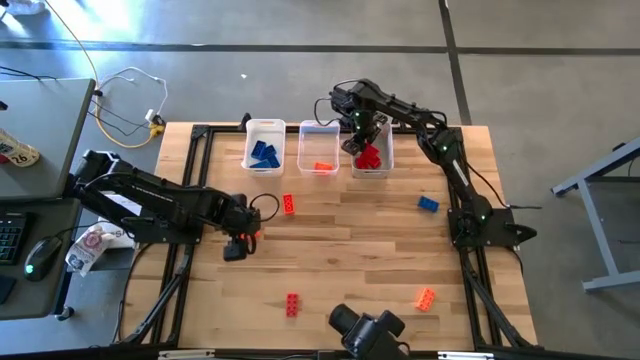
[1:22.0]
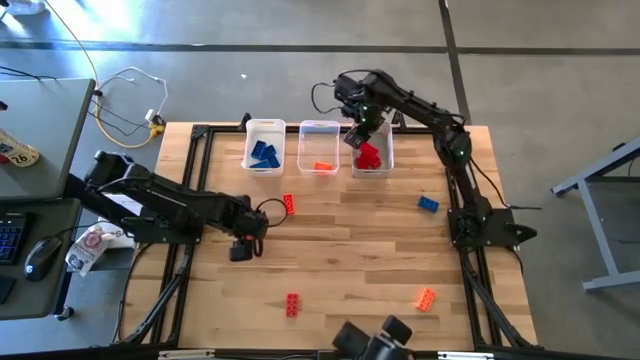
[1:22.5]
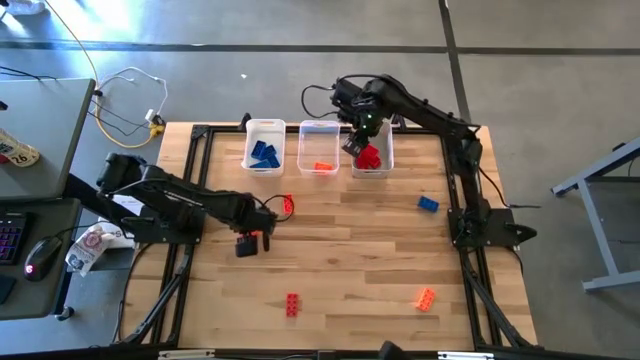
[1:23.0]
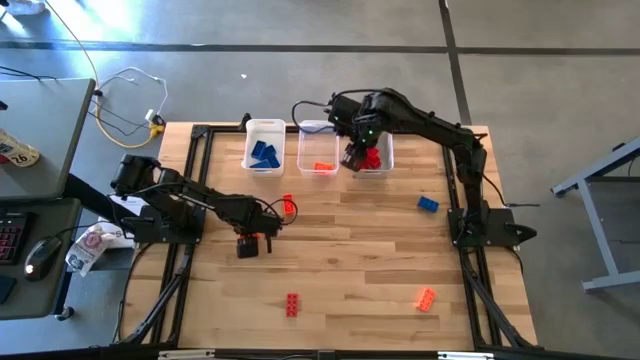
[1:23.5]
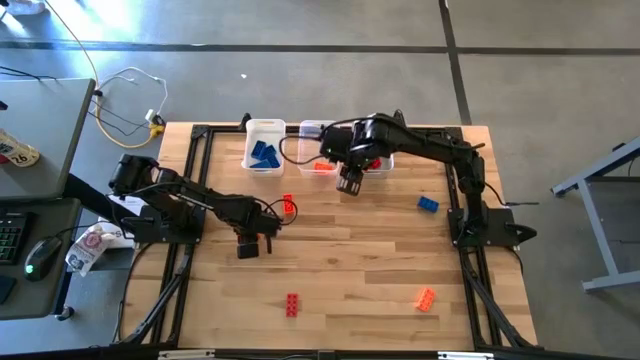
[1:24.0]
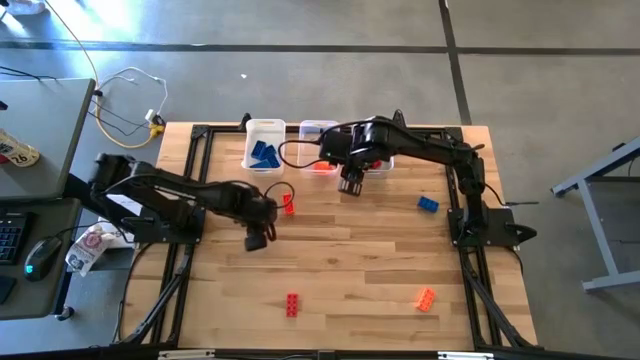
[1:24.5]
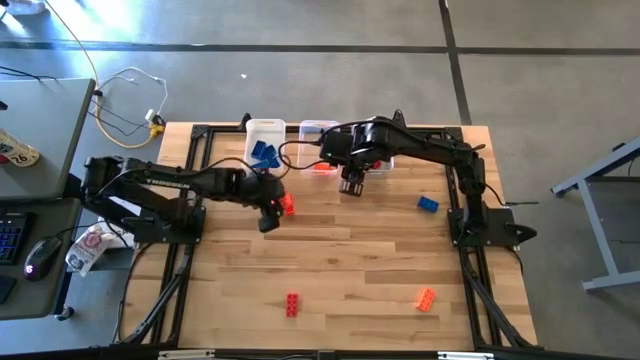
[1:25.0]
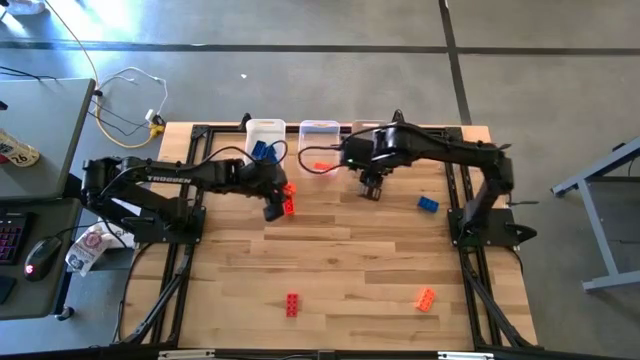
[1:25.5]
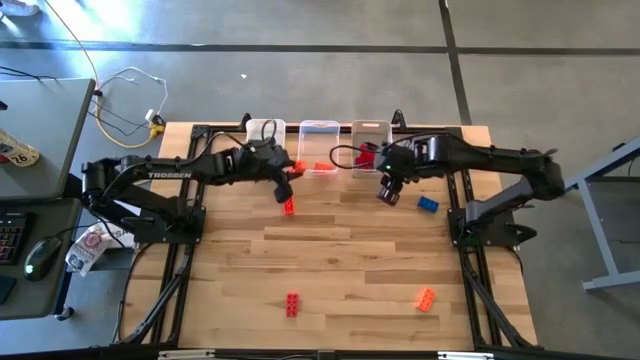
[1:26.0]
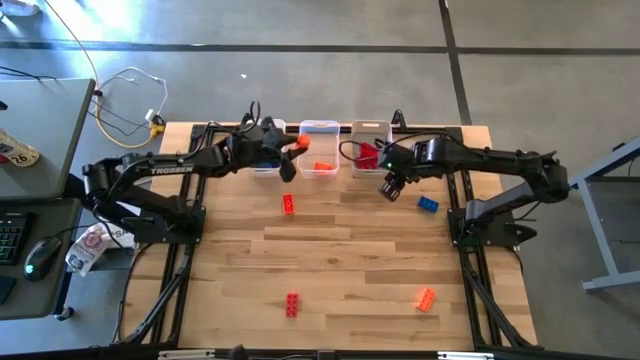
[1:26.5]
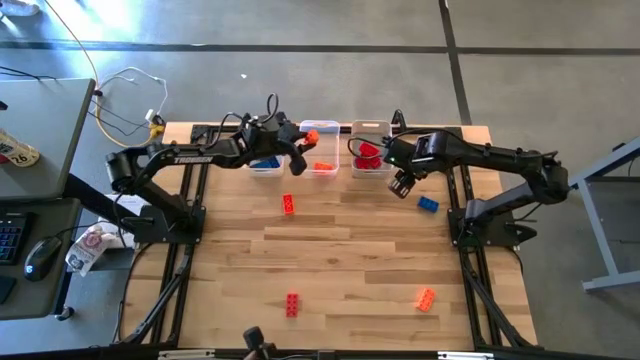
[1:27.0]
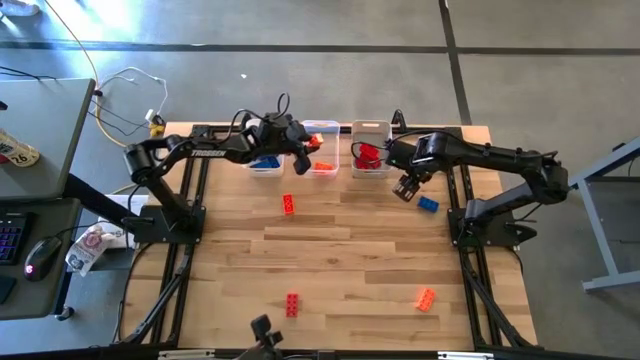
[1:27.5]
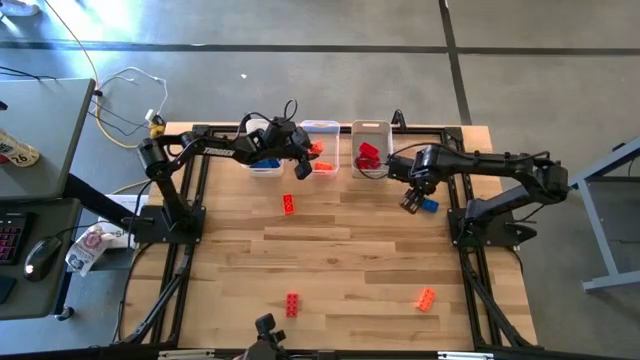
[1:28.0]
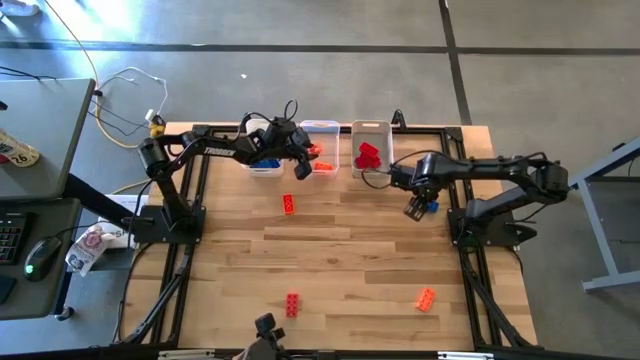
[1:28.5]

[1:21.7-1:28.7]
Task: Sort & place blocks by color
Put the orange game piece into the transparent bin

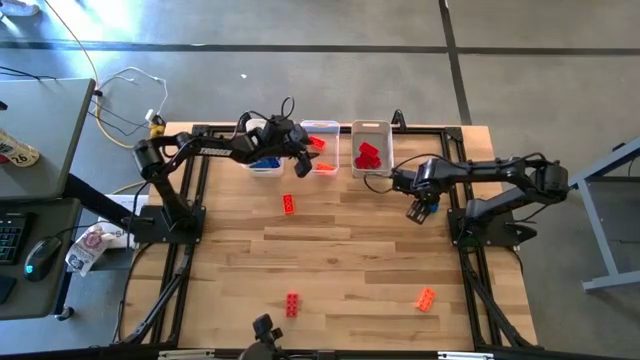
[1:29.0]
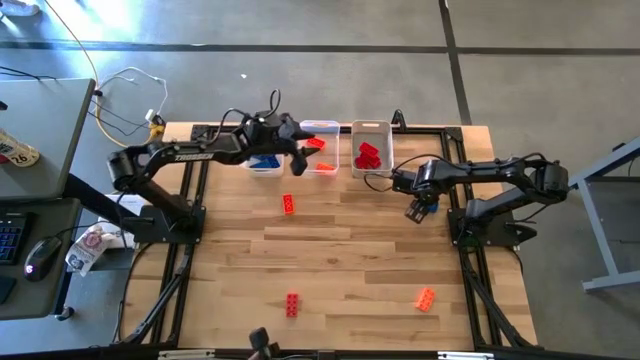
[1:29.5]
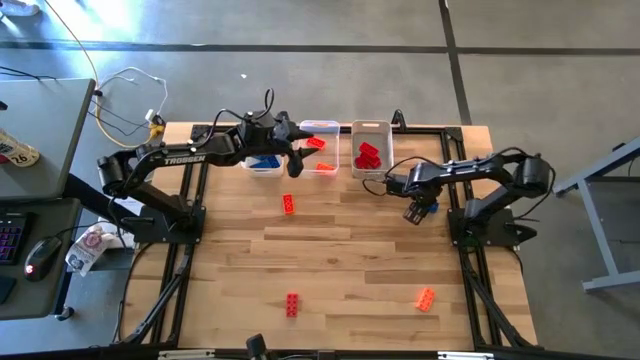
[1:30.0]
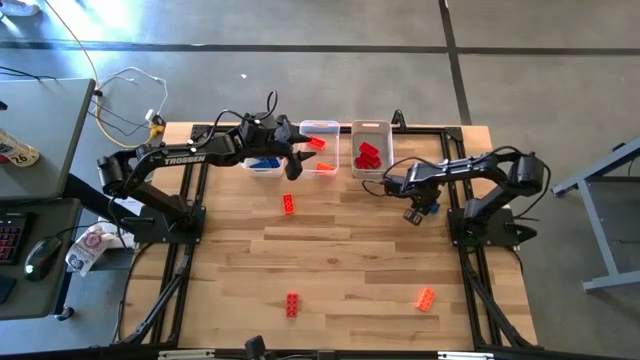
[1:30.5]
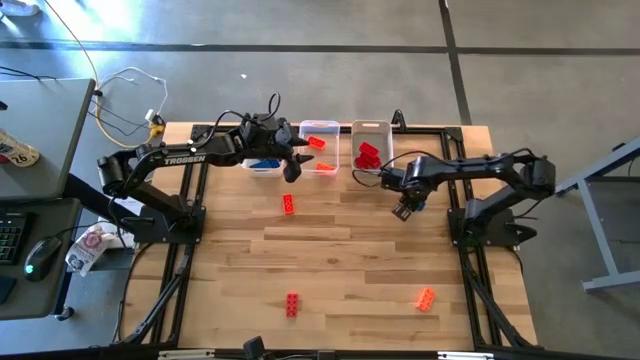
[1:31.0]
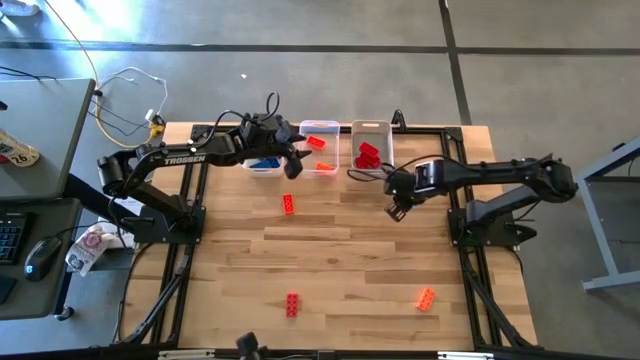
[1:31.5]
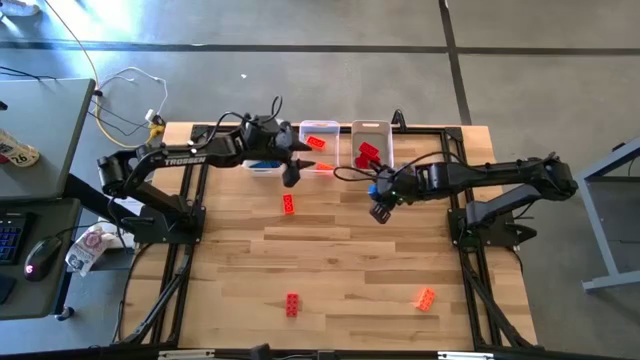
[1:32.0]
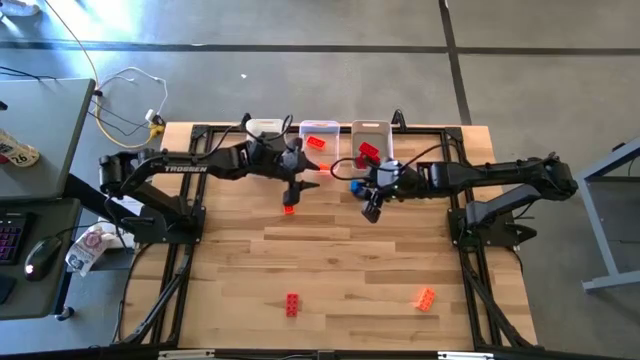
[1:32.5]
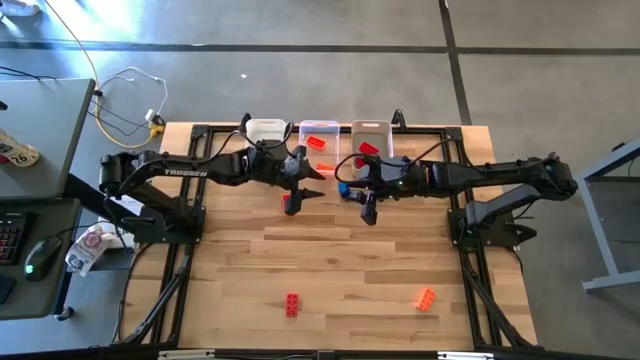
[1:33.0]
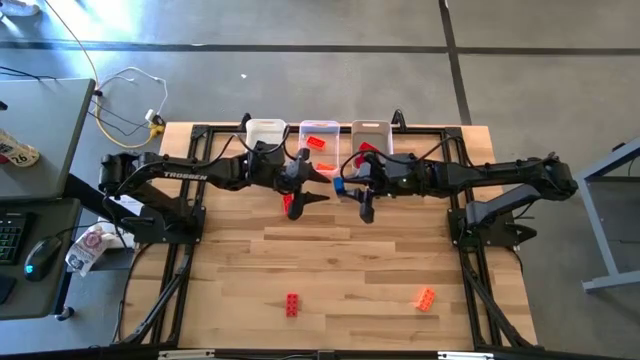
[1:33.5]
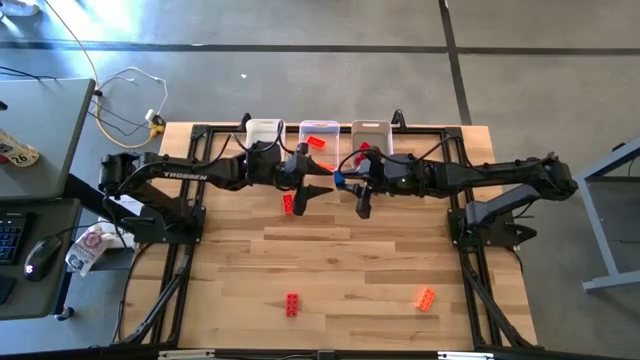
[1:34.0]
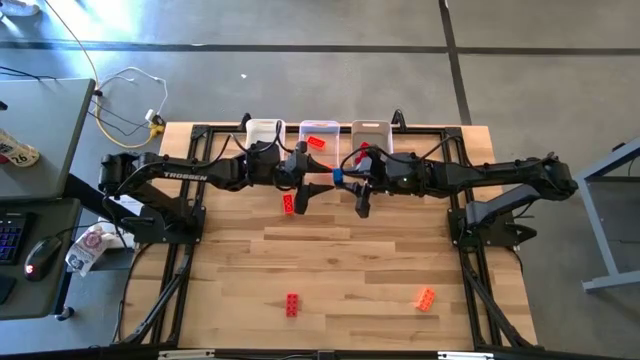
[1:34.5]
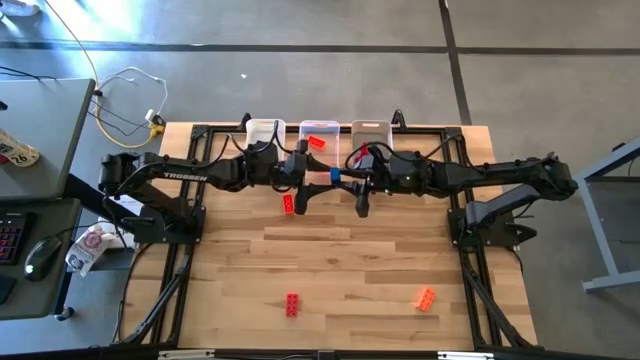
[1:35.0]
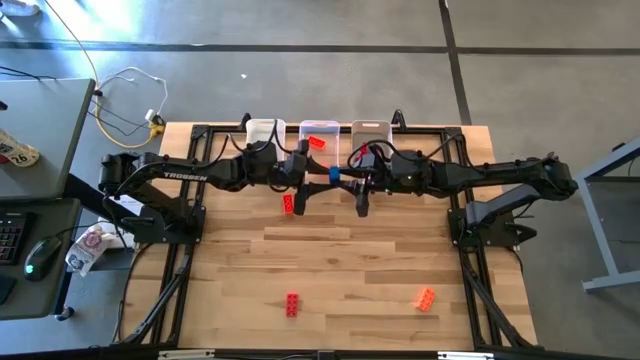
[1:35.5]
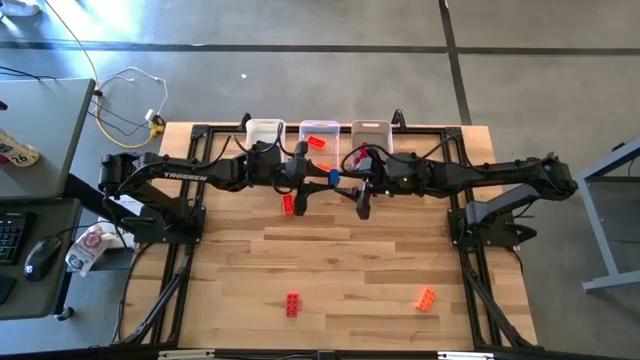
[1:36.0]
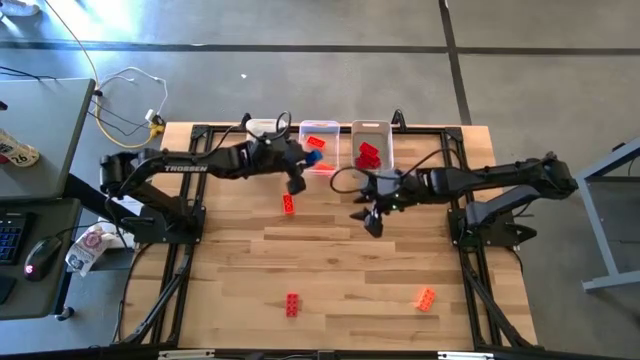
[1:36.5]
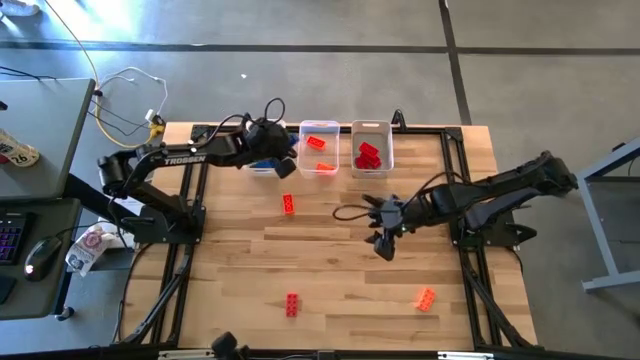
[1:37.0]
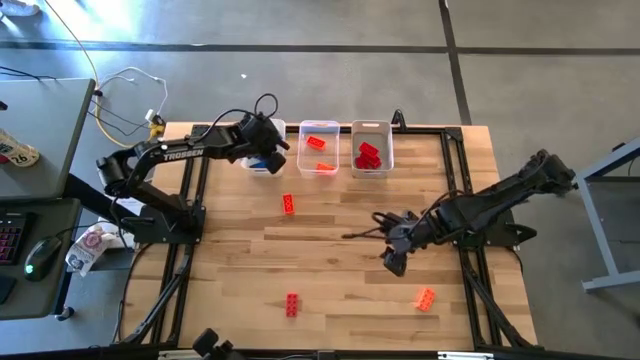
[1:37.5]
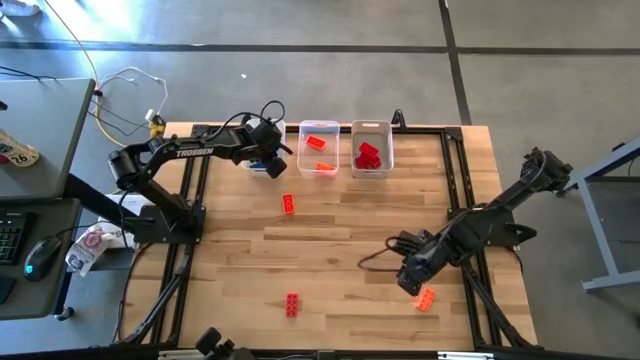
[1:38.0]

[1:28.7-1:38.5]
Put the blue game piece into the white bin

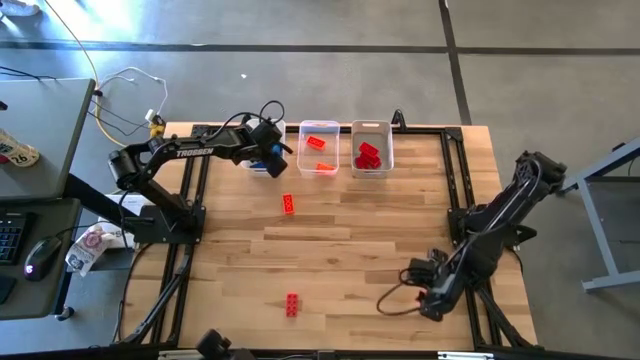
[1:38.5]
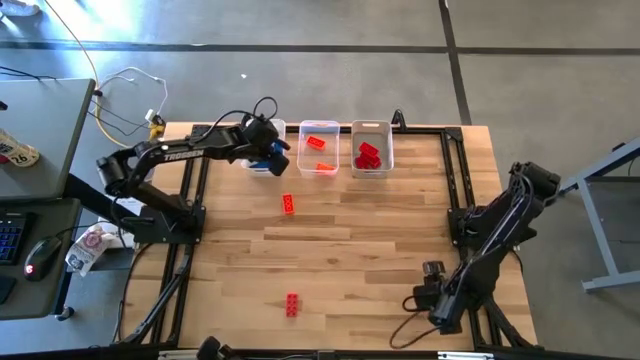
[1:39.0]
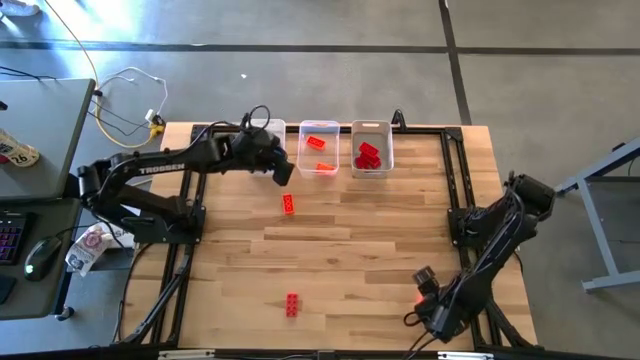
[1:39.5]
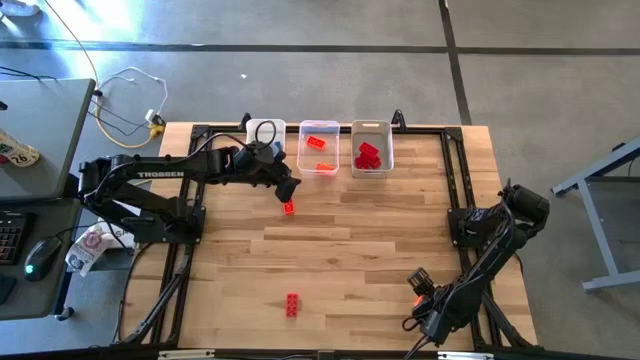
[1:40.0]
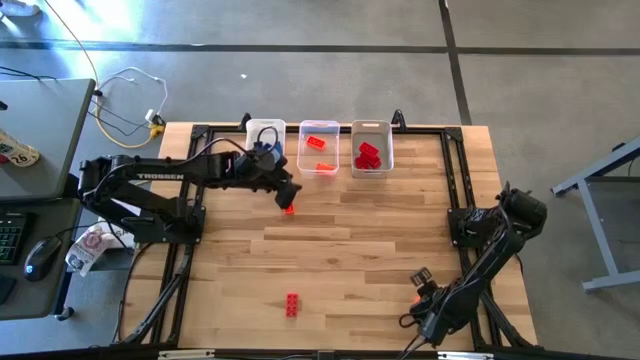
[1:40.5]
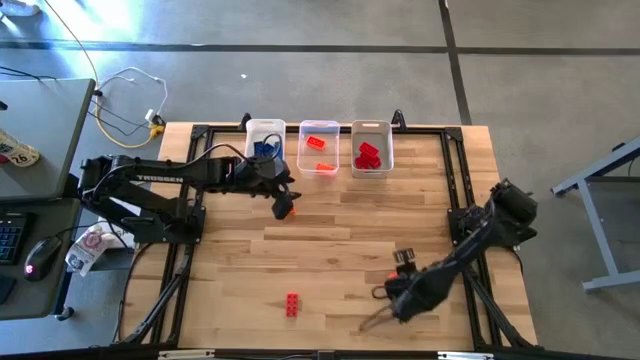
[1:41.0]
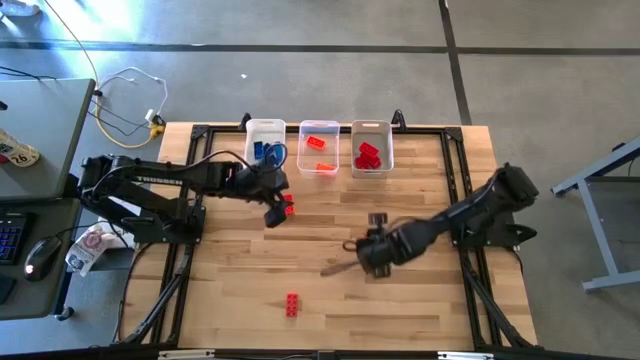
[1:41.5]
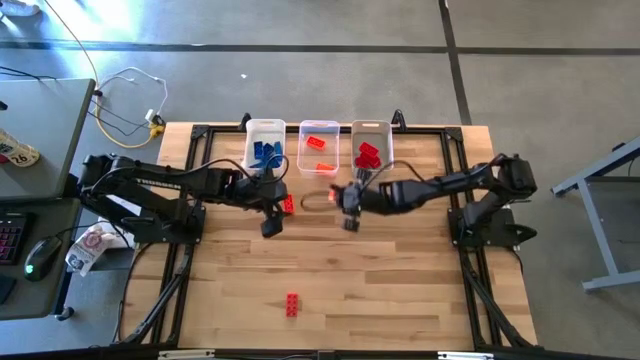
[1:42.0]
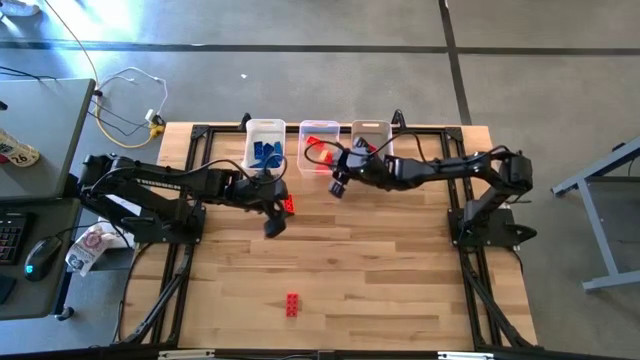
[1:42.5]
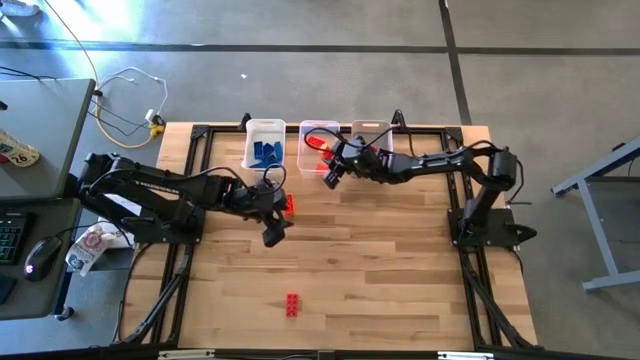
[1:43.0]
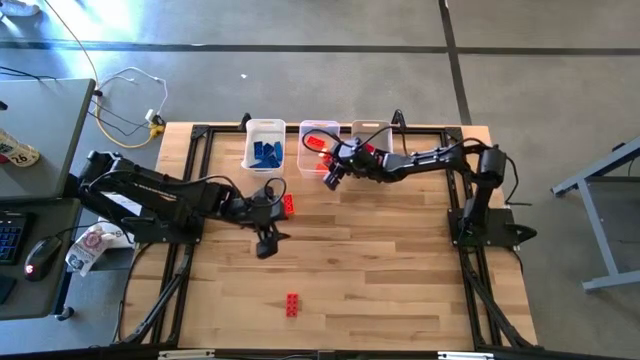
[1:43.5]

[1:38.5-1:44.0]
Put the orange game piece into the transparent bin
